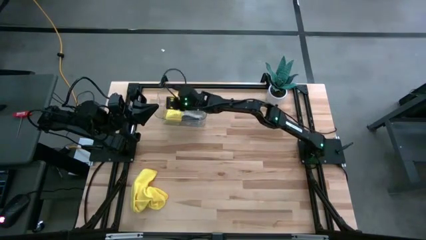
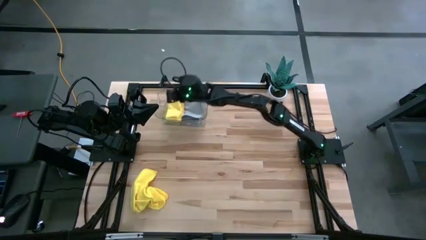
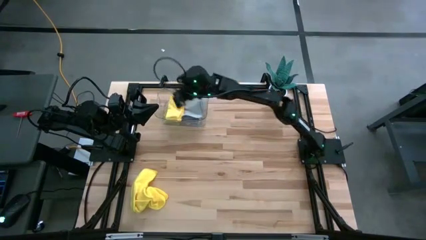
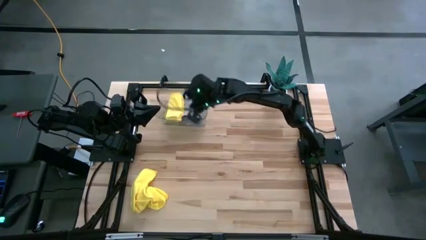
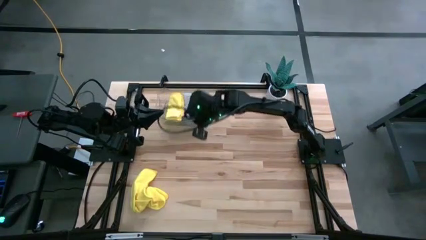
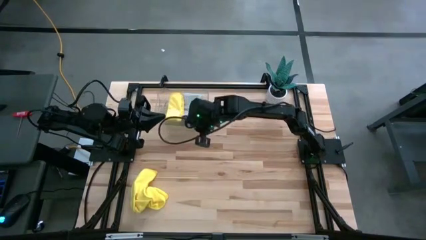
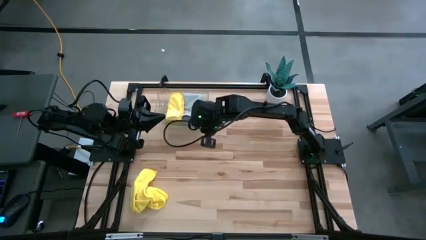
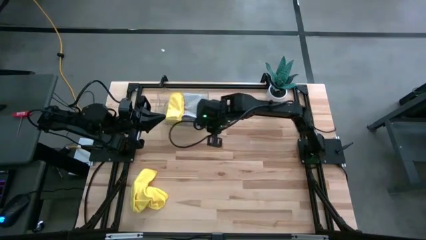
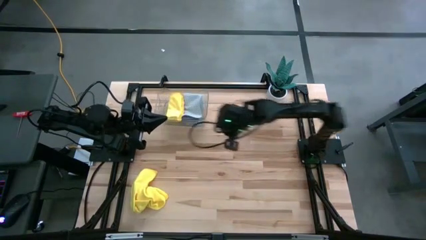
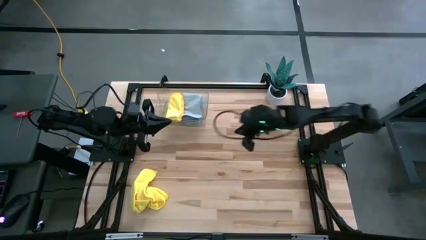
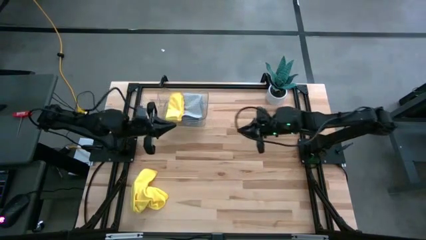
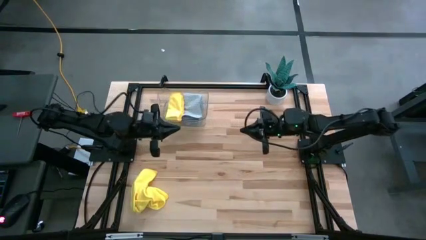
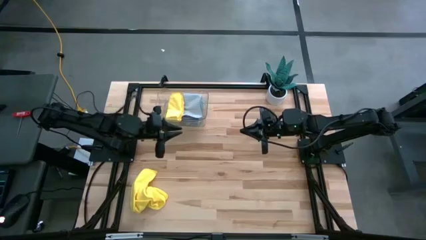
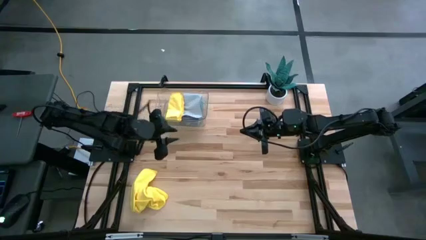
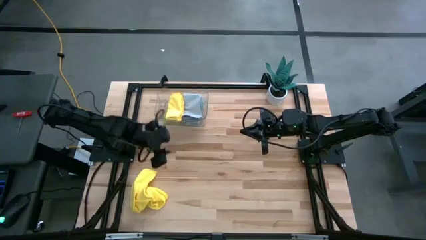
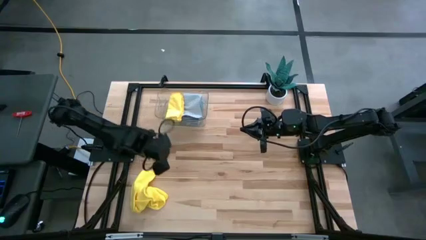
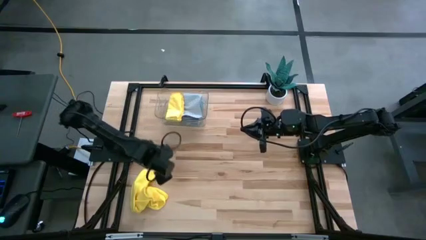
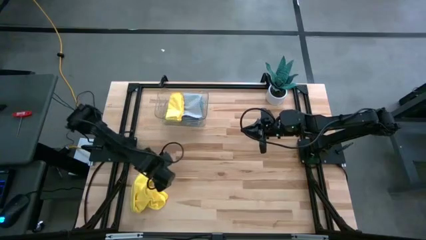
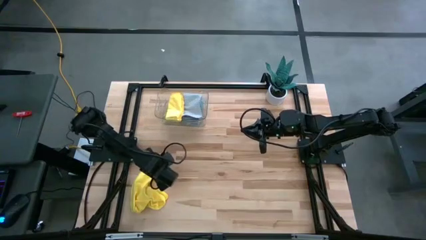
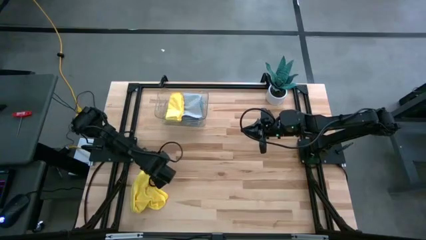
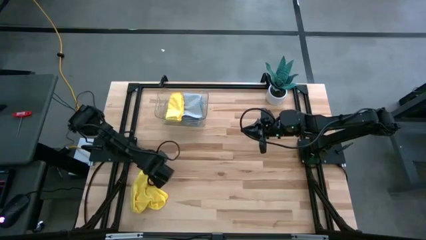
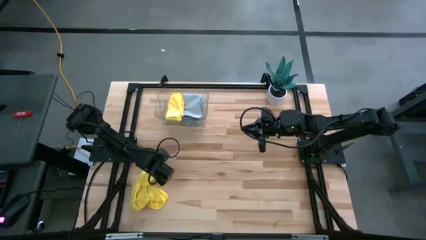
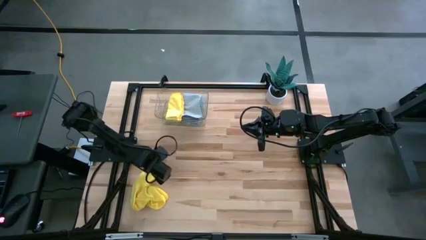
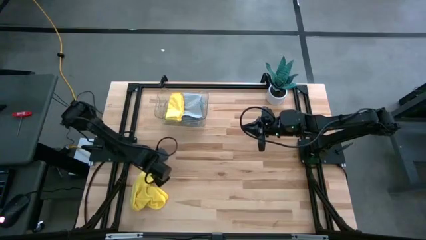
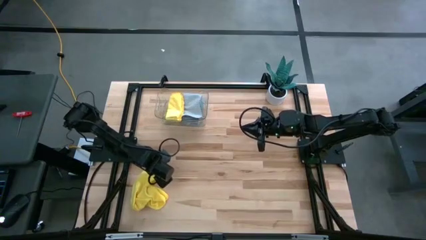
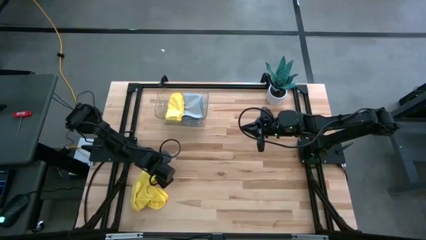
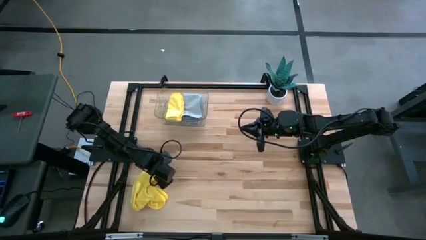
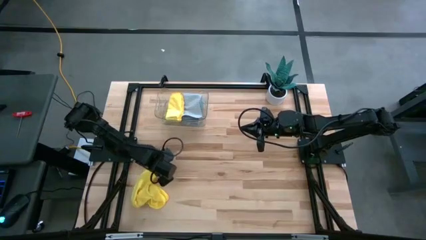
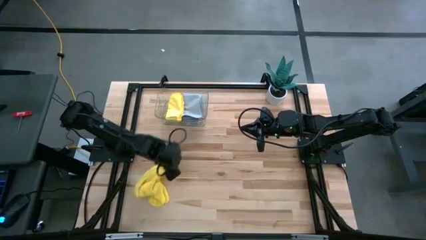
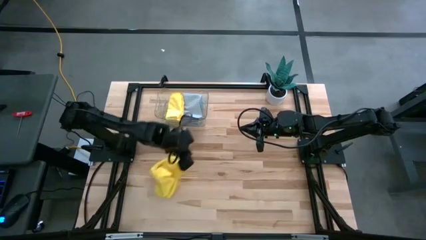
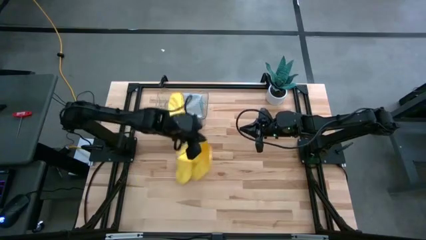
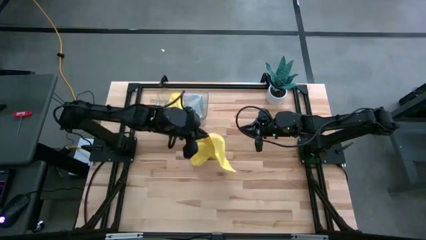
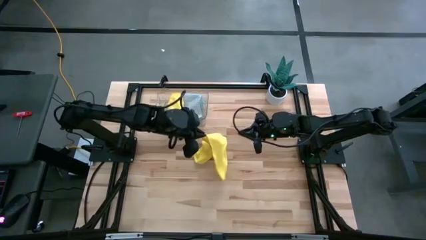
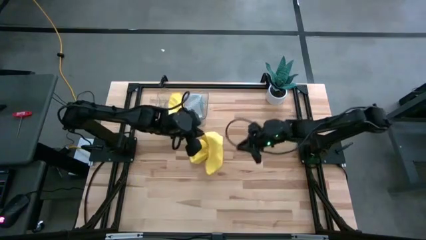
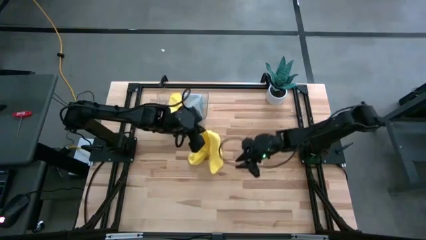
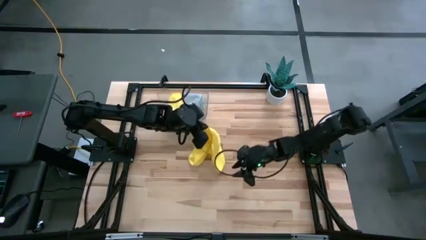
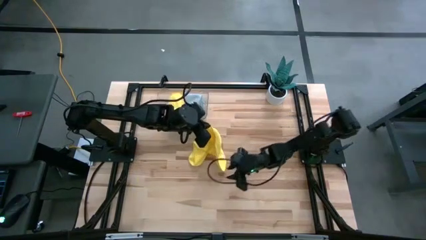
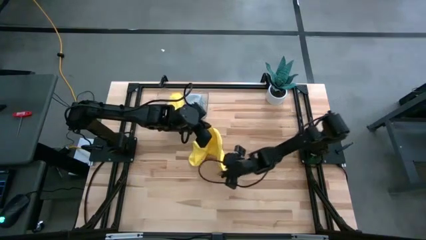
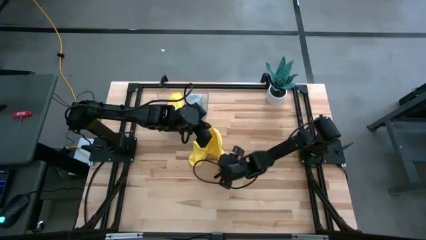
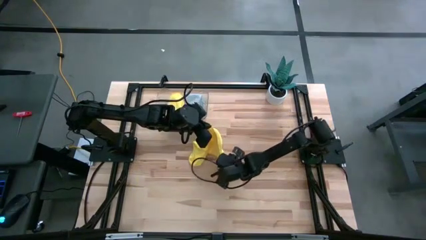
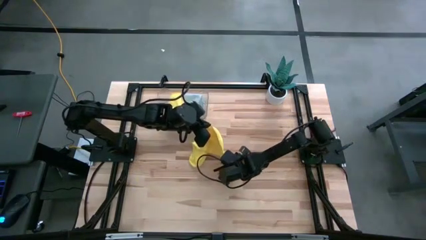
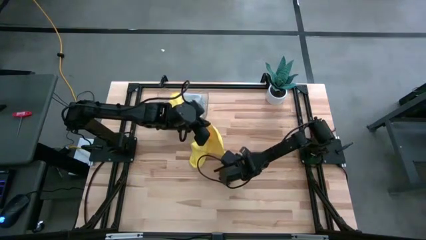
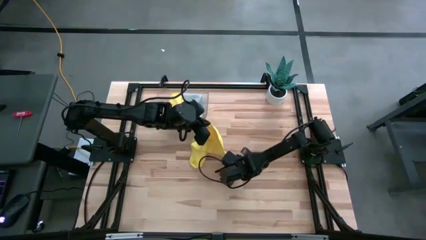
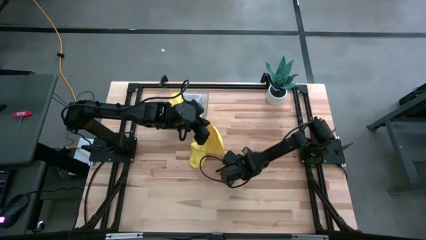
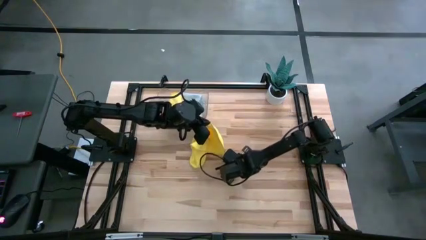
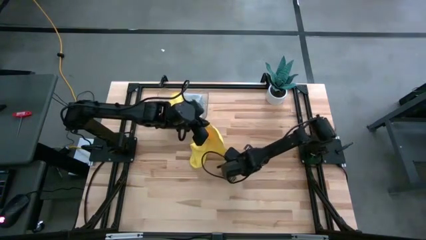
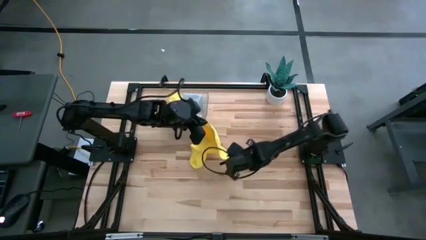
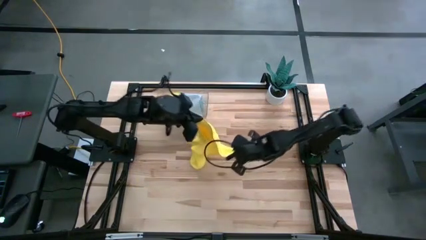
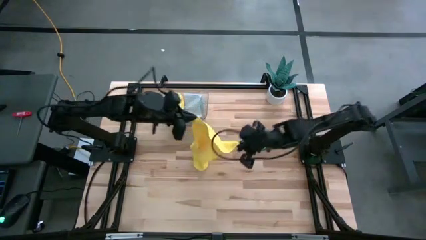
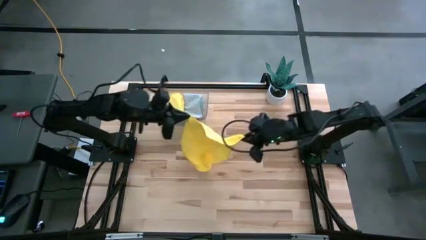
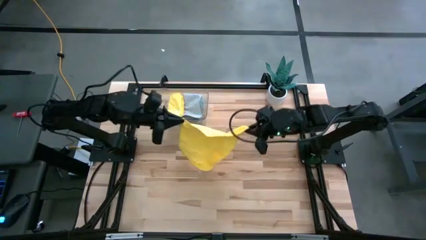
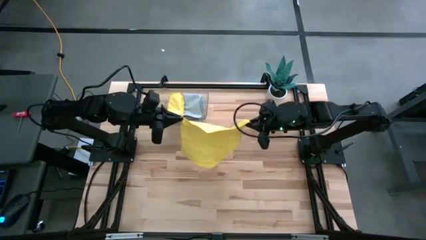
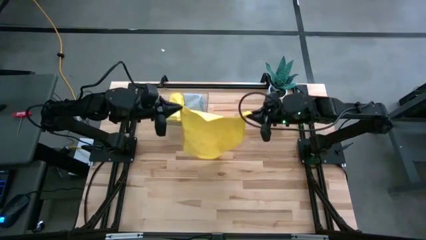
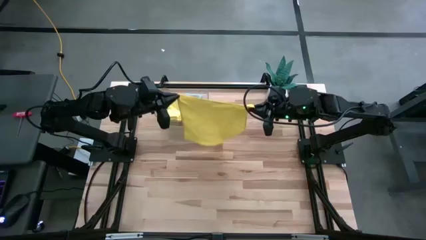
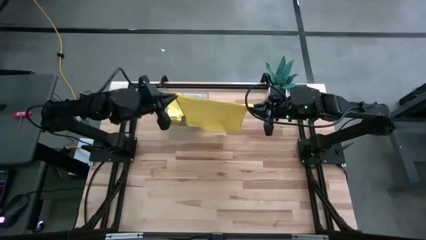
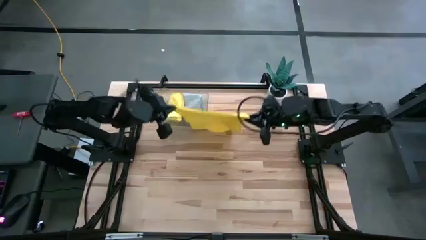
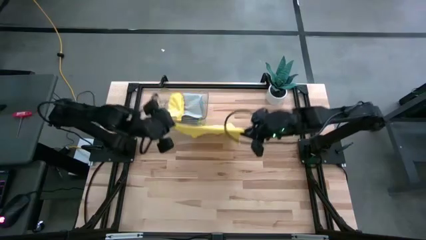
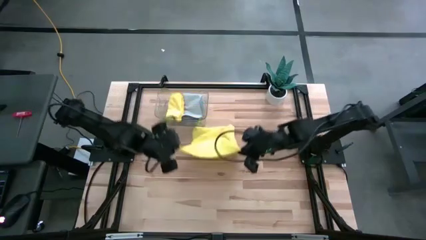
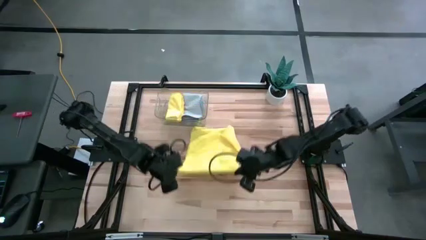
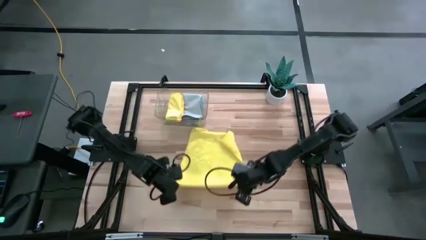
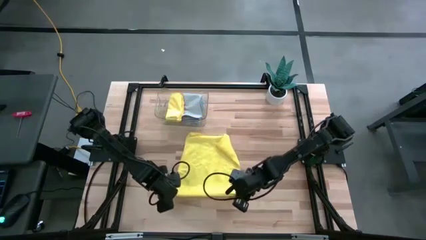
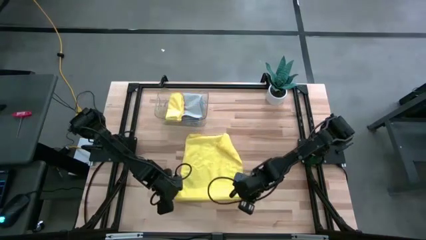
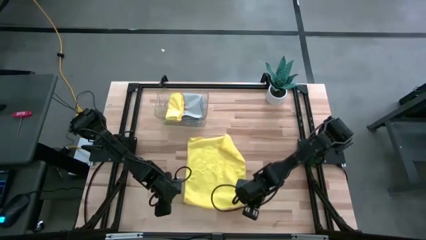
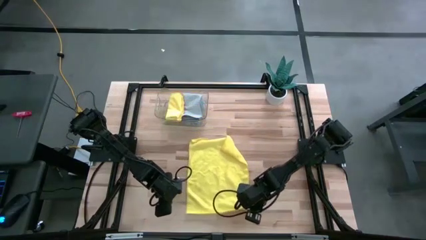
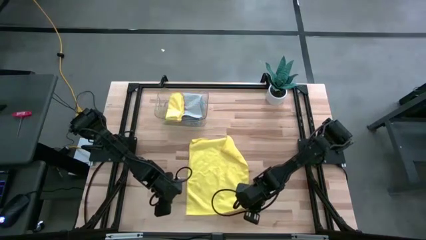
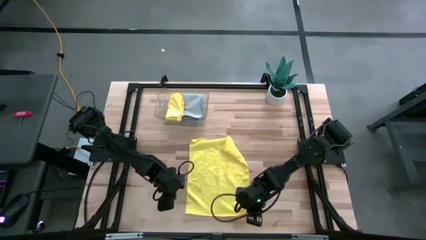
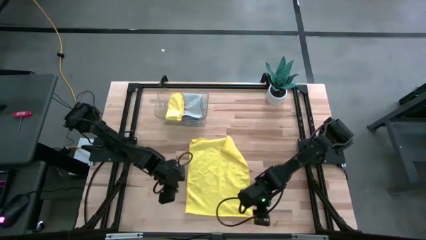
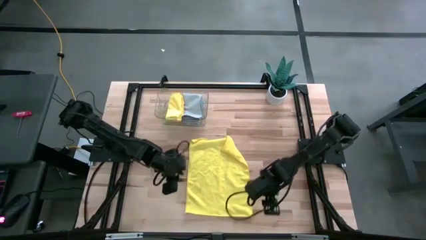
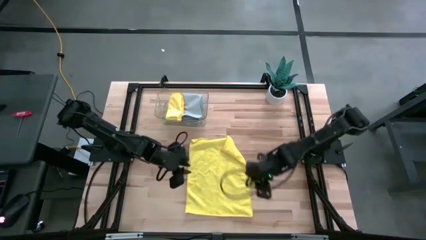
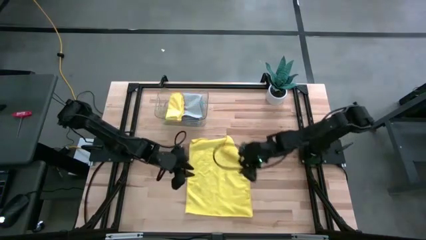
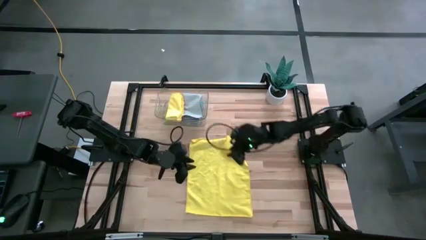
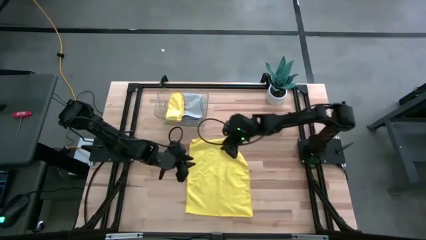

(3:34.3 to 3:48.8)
Task: Fold microfiber towels
Fold the yellow towel
